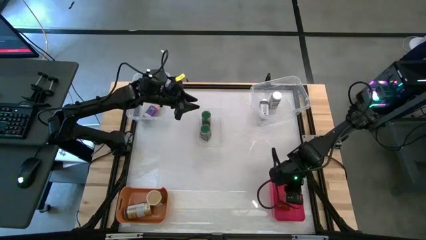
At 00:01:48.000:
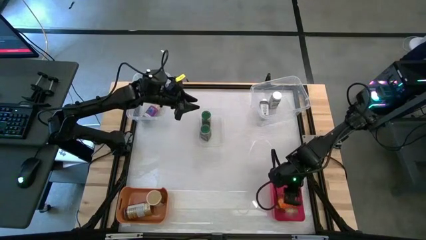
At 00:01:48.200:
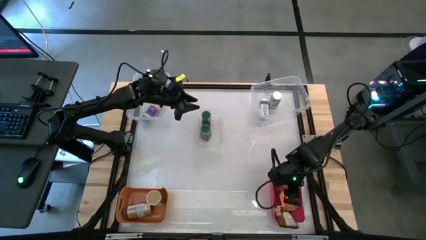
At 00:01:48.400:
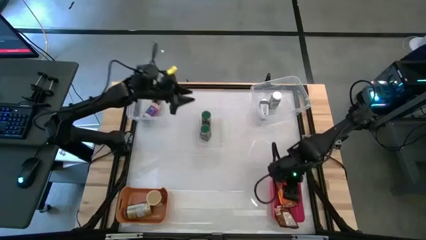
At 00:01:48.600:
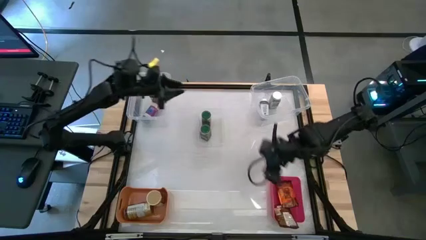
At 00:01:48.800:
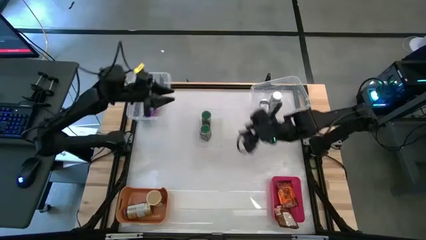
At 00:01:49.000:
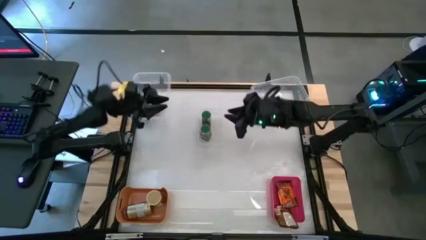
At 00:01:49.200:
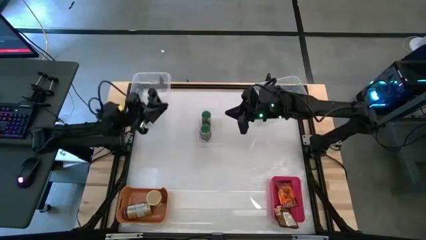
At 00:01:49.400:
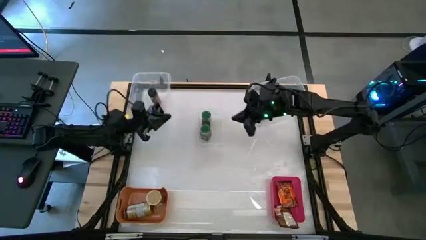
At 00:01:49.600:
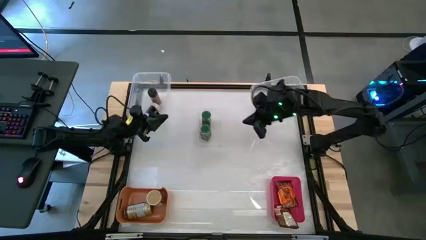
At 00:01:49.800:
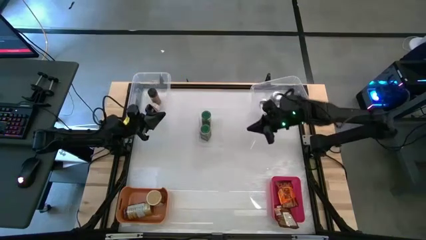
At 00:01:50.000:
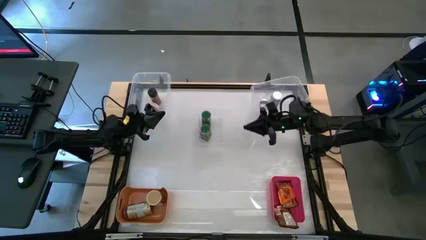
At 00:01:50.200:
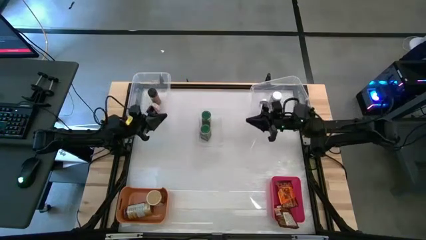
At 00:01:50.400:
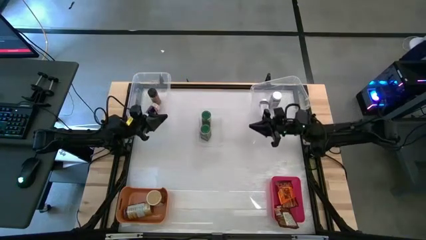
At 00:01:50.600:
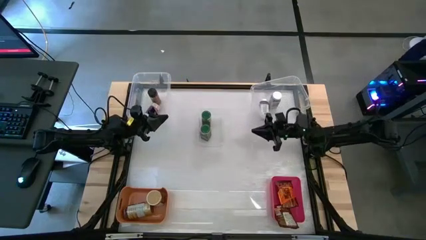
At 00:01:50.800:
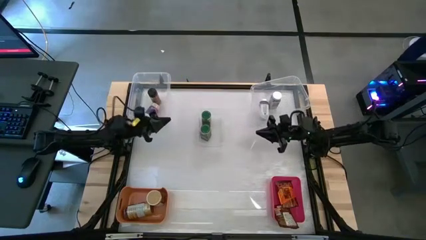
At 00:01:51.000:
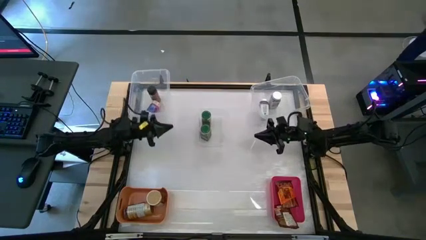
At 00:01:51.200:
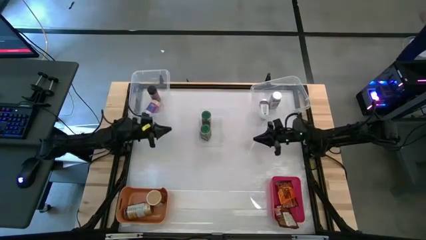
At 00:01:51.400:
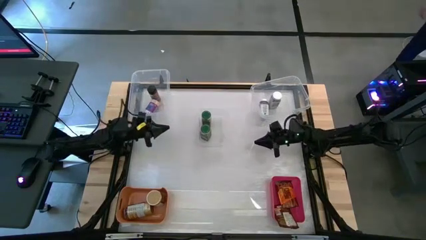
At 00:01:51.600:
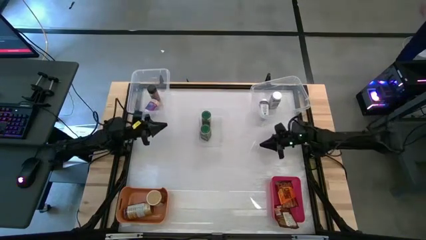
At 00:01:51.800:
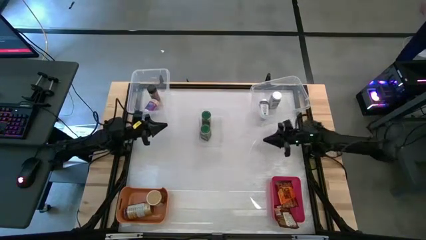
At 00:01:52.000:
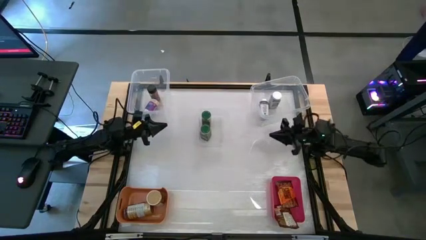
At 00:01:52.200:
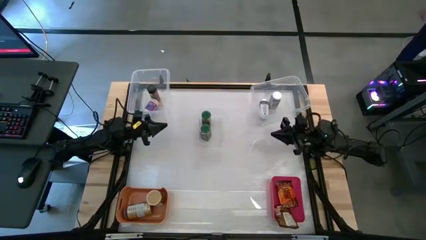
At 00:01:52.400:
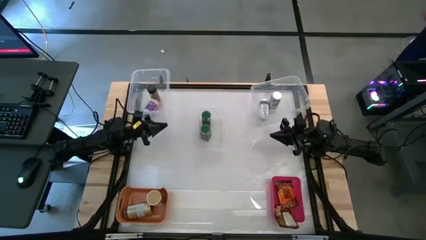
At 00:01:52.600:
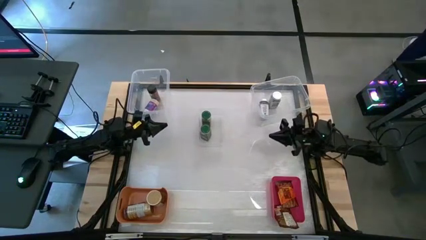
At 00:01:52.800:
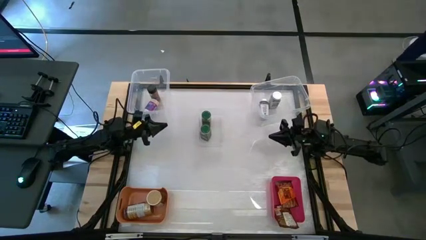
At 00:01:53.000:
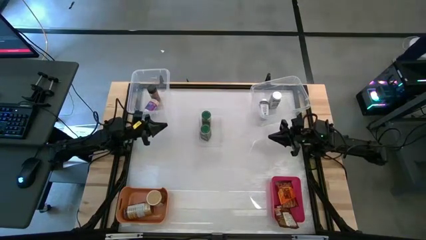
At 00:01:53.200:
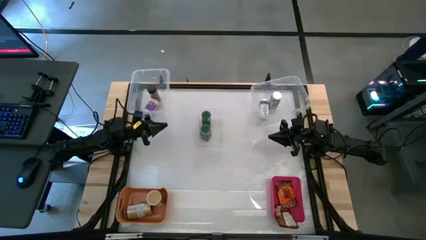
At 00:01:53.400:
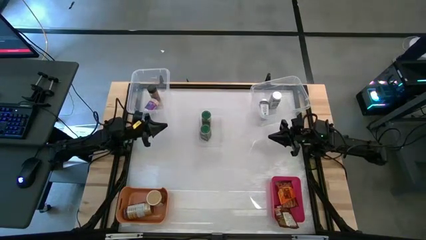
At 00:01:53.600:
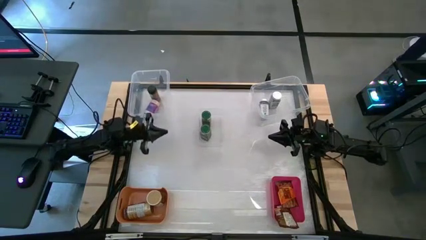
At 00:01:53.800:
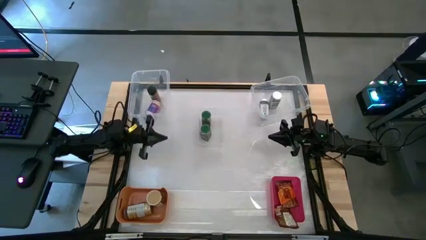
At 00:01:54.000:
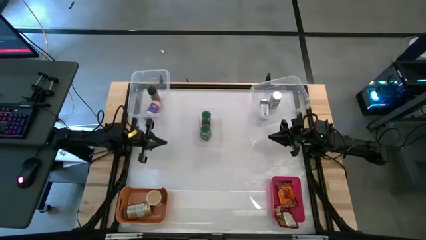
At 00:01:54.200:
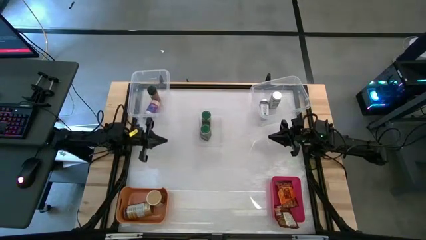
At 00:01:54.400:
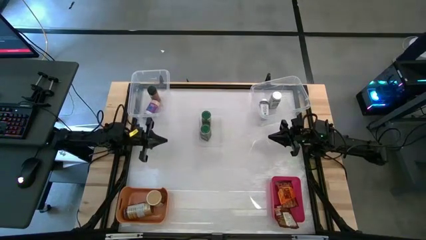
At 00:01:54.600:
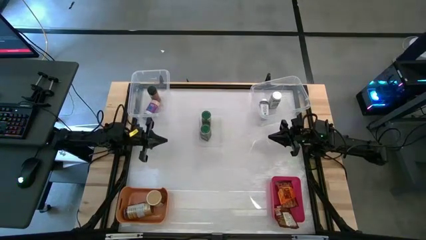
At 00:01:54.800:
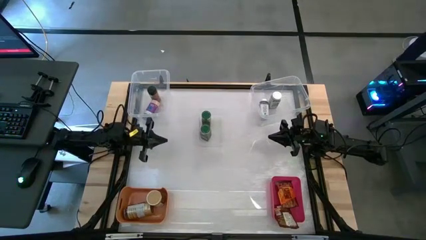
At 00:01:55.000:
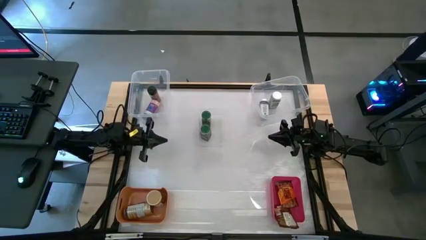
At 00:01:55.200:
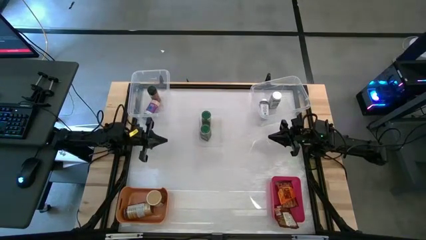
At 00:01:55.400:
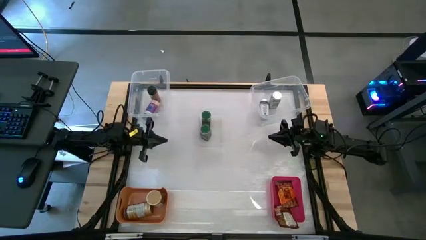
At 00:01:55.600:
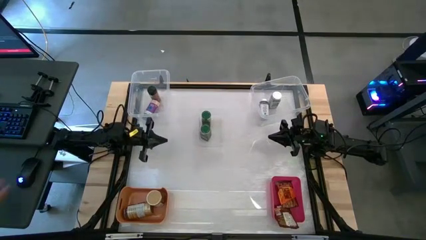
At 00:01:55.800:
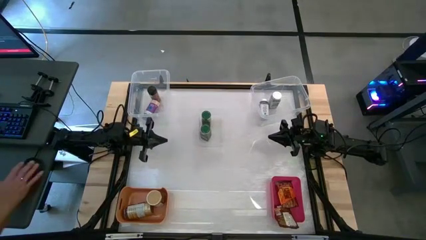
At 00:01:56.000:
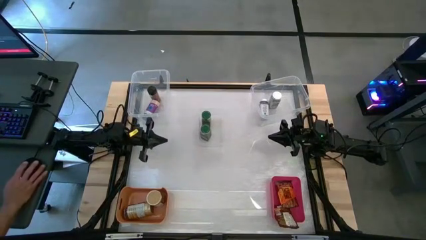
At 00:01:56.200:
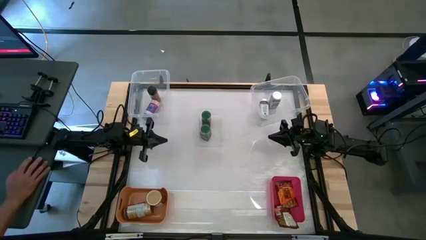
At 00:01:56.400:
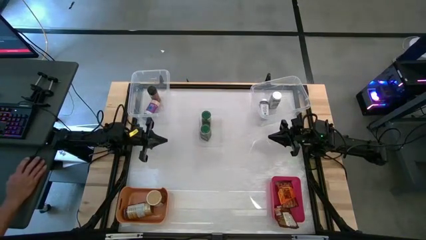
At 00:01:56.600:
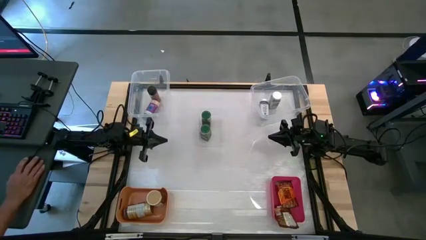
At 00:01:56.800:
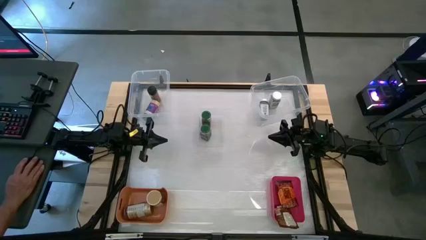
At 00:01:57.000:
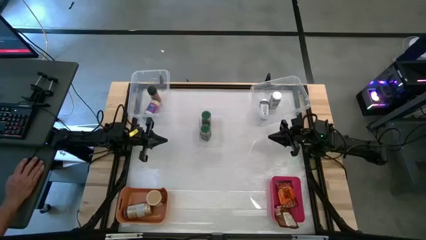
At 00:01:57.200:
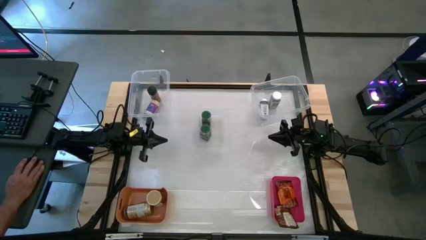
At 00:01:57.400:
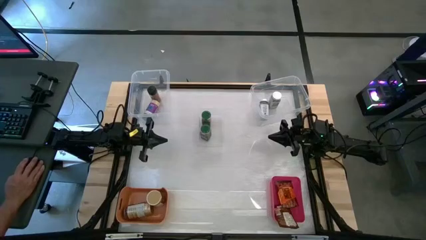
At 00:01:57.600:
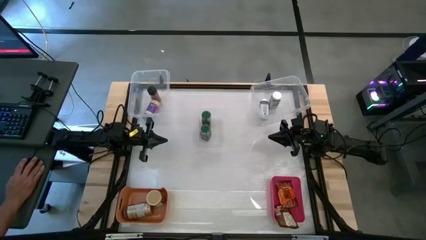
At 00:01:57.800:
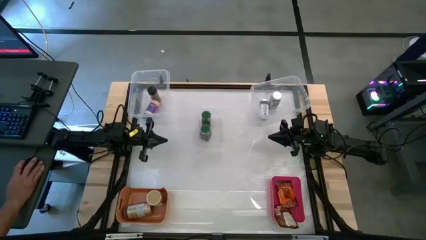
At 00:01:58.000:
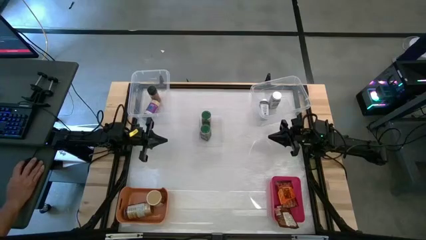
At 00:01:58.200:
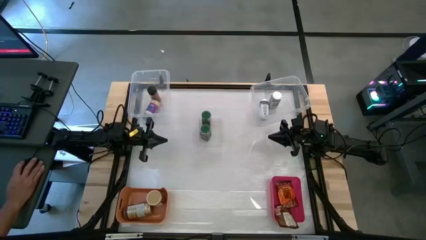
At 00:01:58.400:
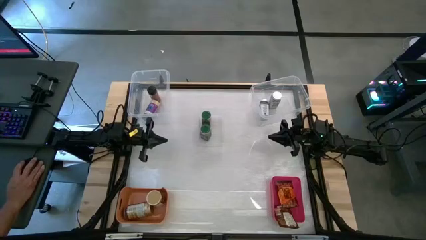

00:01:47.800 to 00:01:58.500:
Task: Sort spices by type
Return to Home Position
